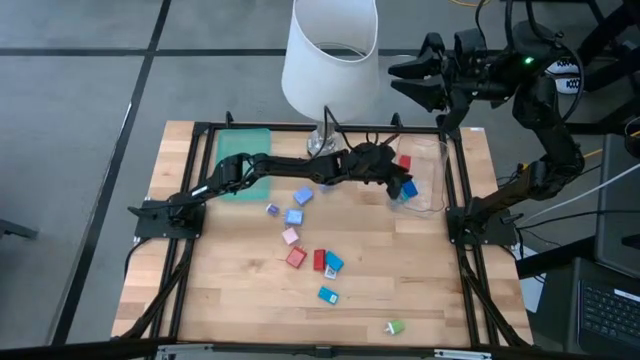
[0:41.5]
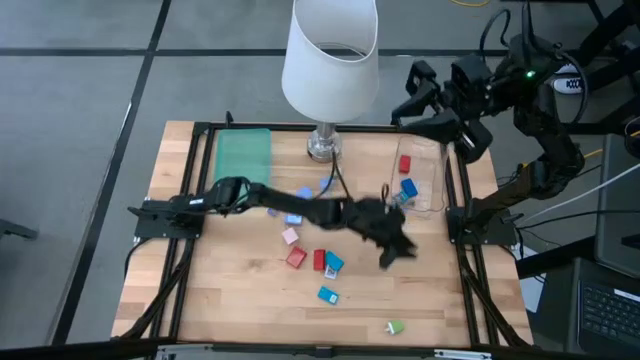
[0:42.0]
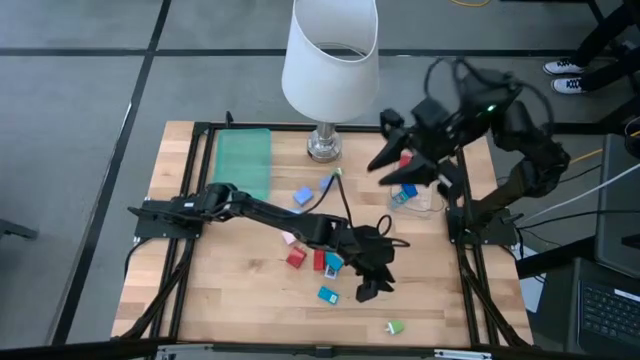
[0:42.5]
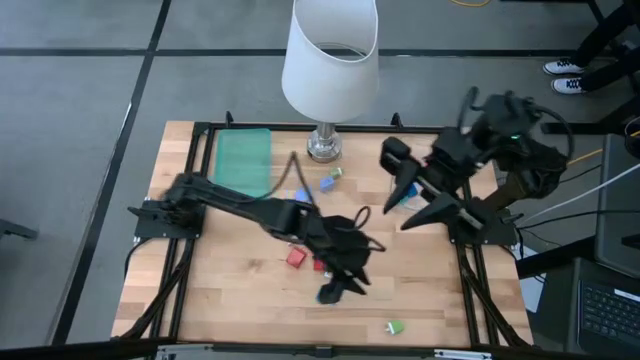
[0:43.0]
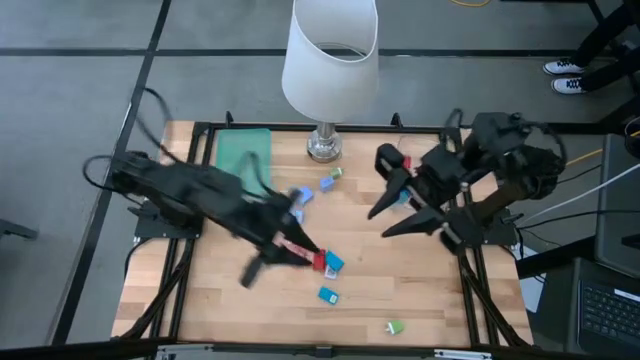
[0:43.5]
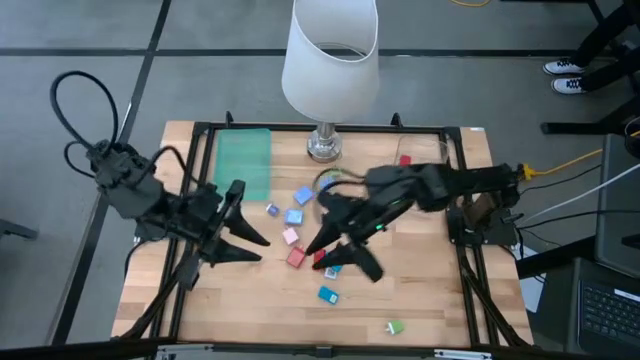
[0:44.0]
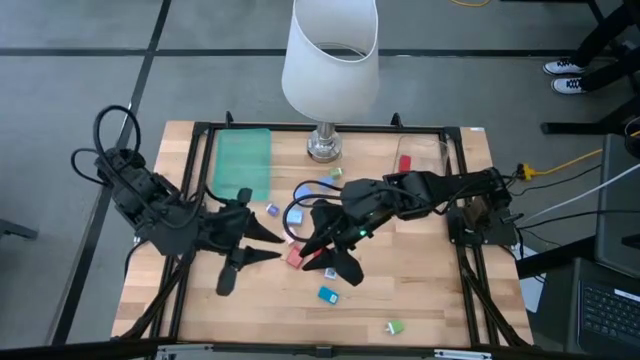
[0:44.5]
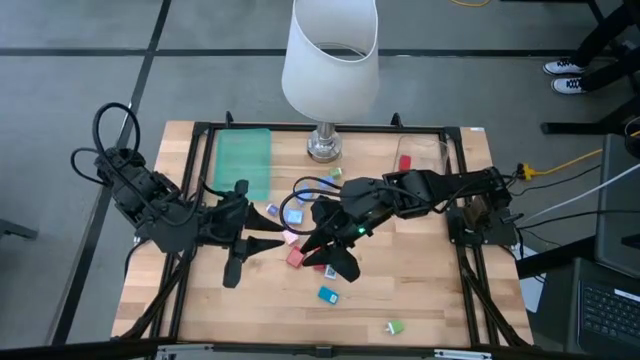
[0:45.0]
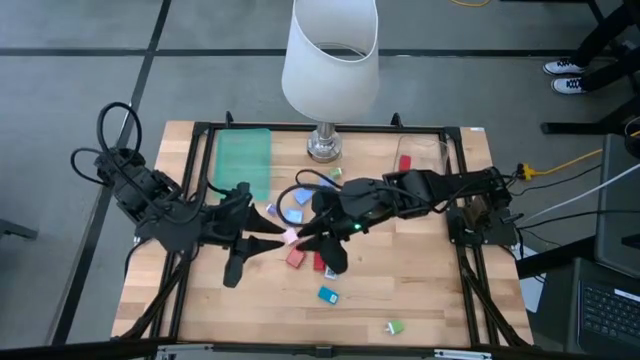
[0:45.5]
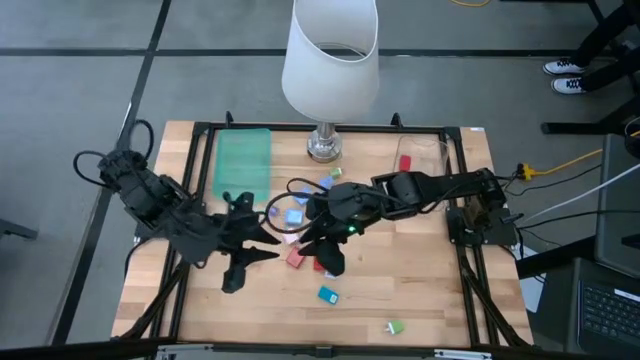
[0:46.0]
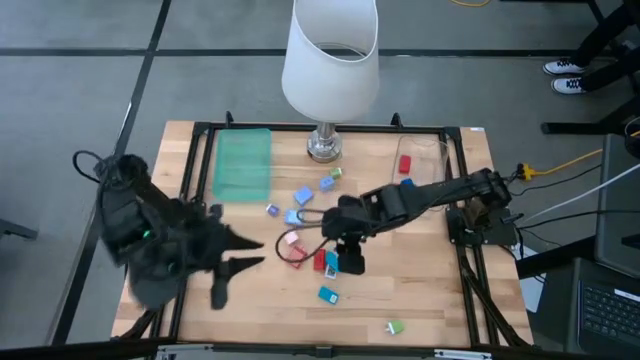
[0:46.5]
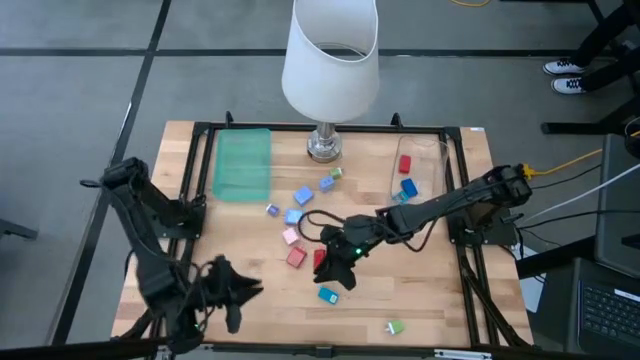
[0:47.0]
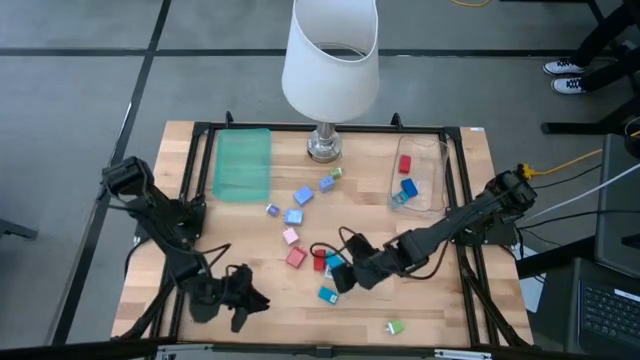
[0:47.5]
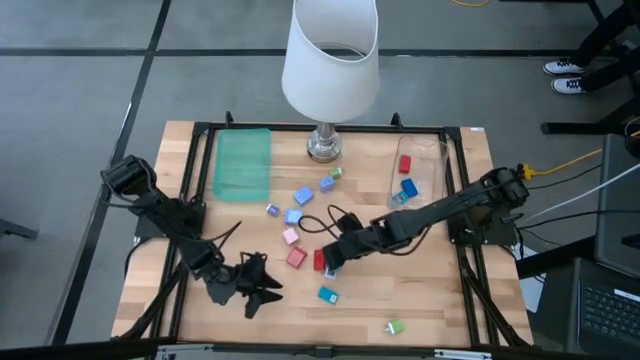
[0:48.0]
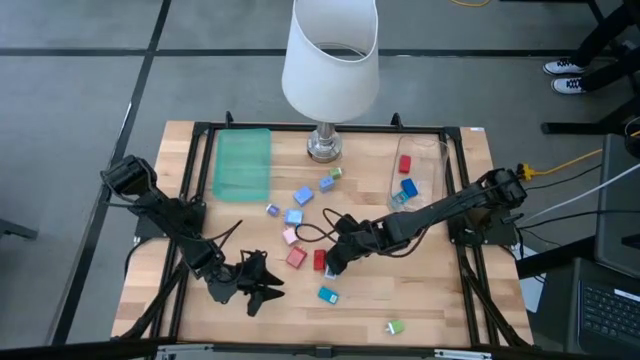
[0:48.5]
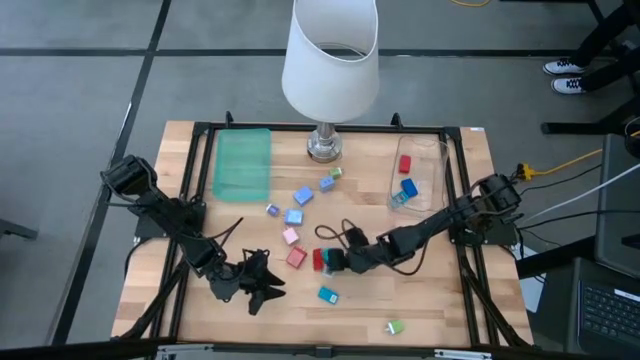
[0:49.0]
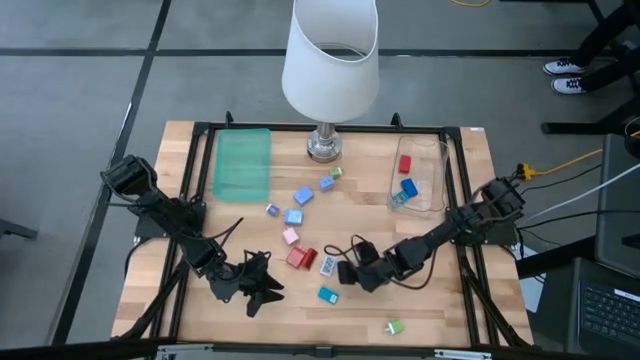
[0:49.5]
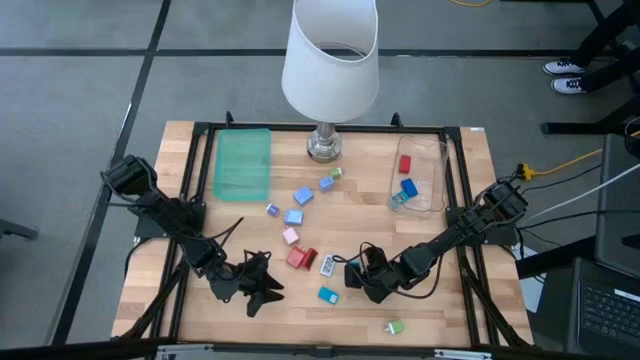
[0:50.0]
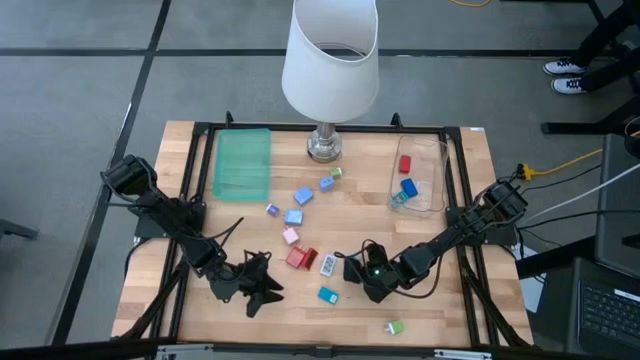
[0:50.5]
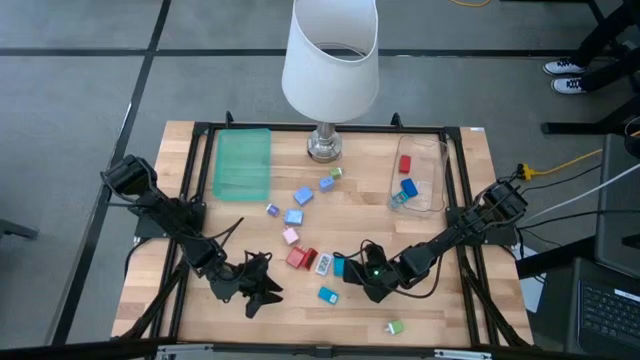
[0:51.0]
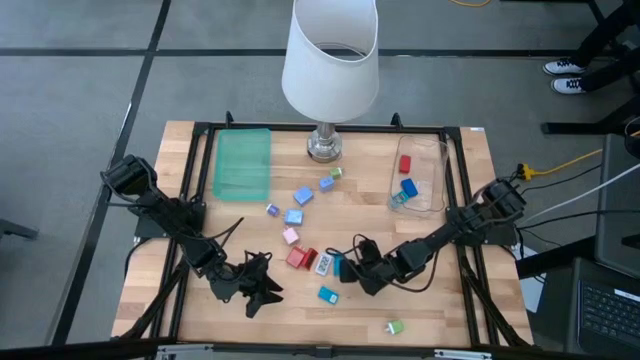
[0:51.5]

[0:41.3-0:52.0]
Task: Pick & Place Office items
Put the light blue timer cover into the transparent bin

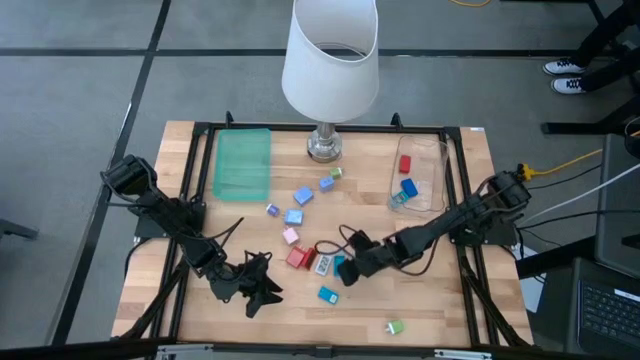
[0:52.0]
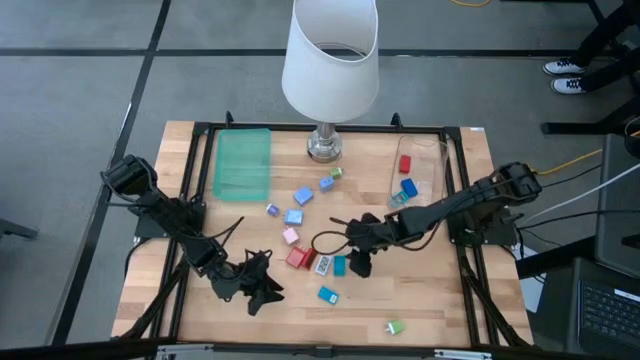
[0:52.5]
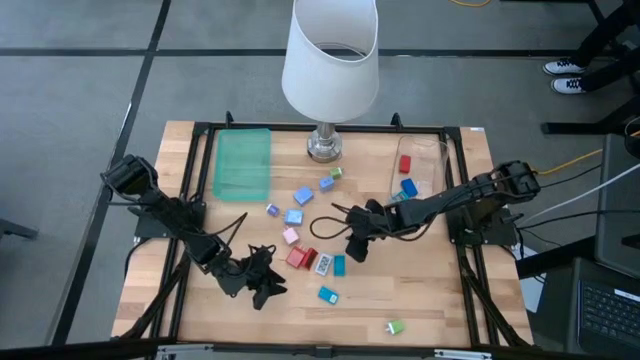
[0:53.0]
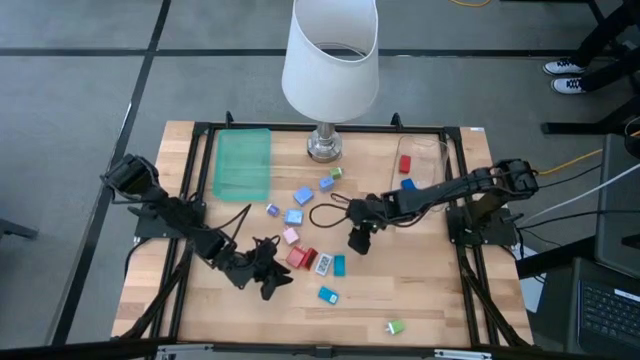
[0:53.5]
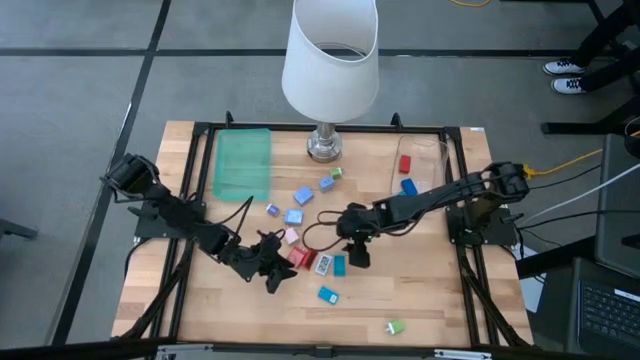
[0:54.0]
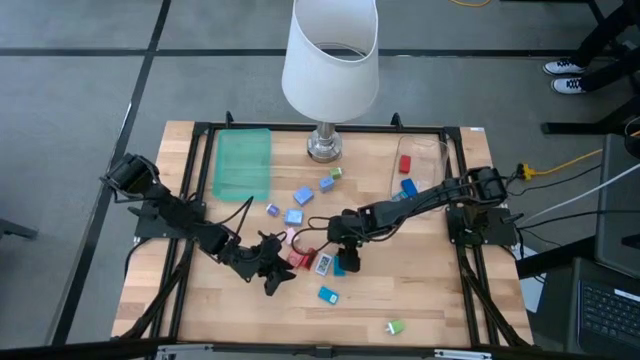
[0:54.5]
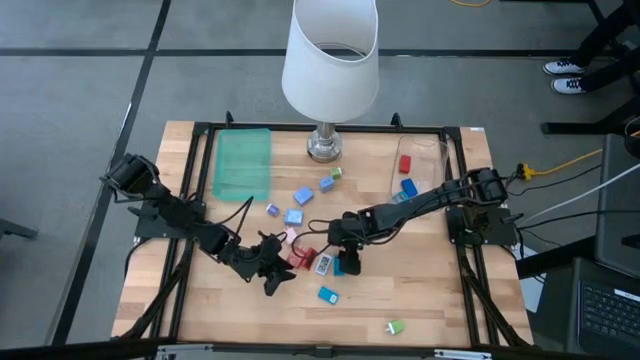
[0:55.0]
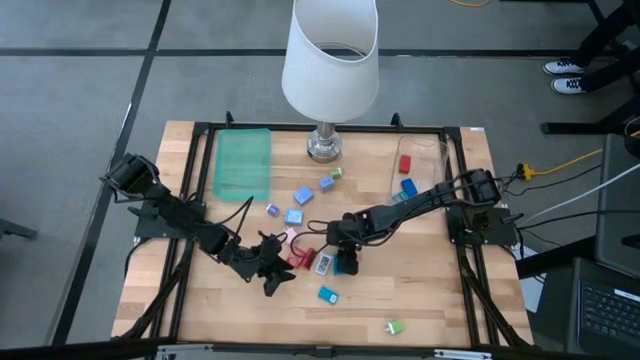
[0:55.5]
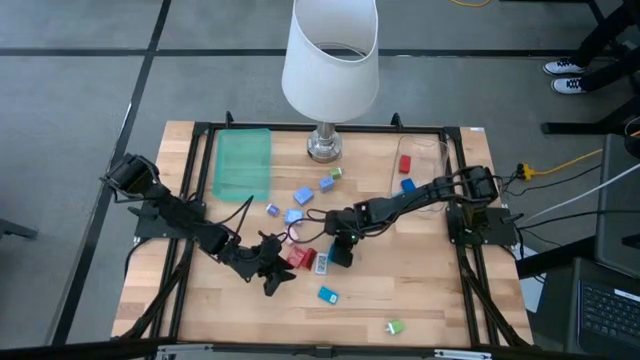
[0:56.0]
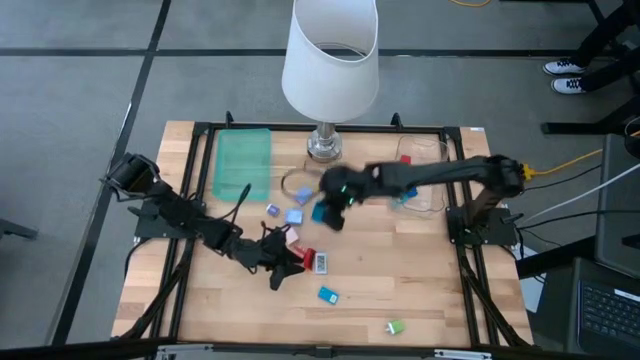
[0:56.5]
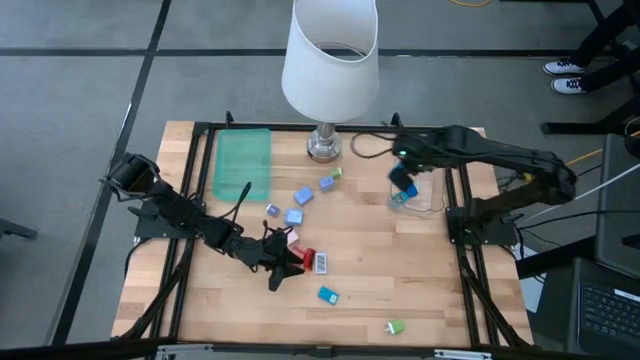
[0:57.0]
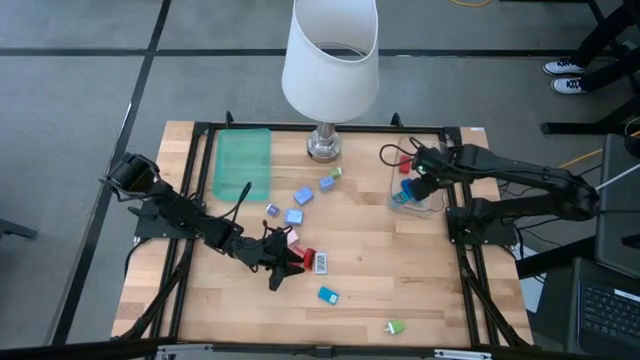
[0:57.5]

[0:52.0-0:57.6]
Put the light blue timer cover into the transparent bin

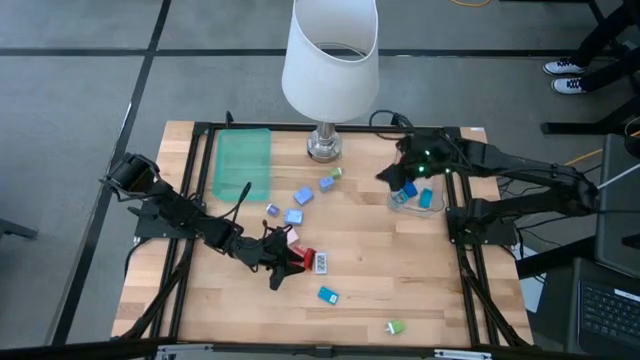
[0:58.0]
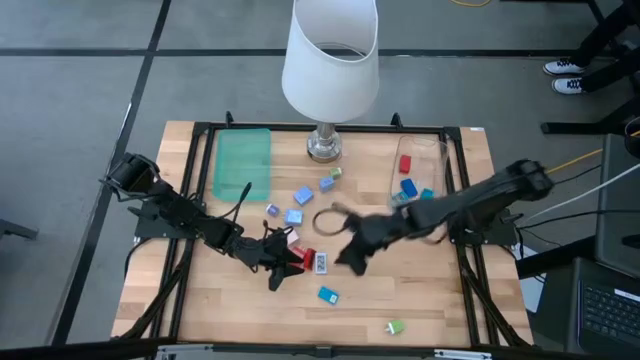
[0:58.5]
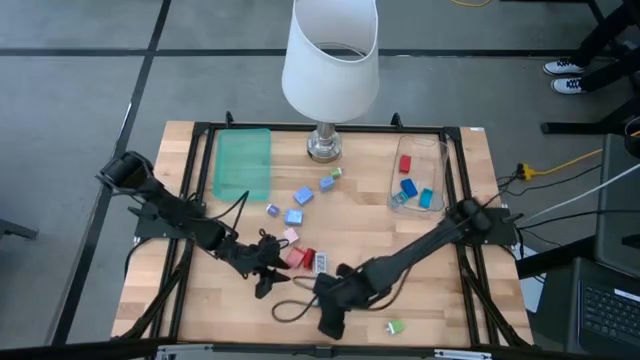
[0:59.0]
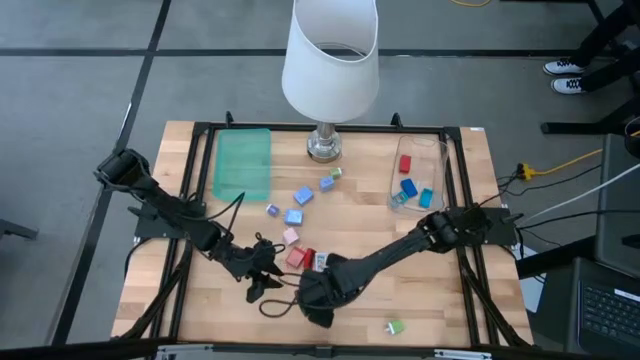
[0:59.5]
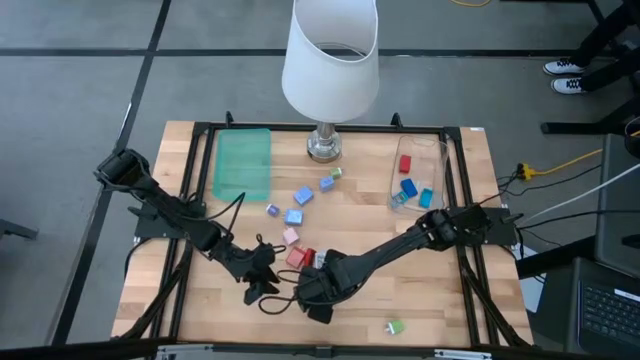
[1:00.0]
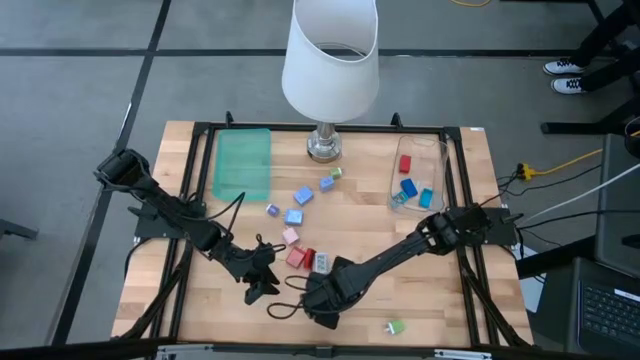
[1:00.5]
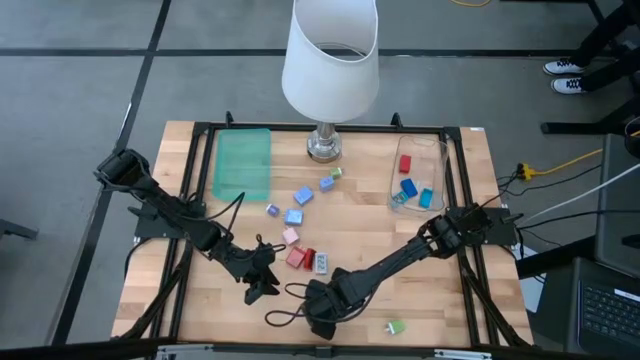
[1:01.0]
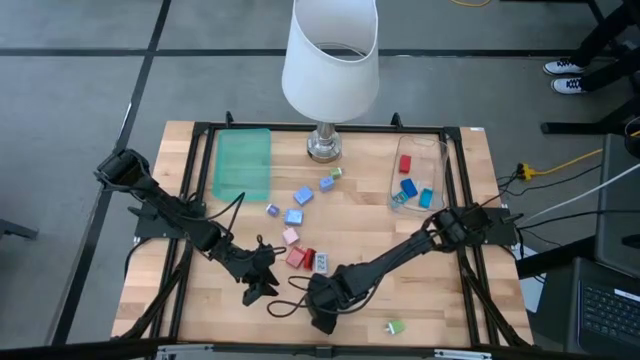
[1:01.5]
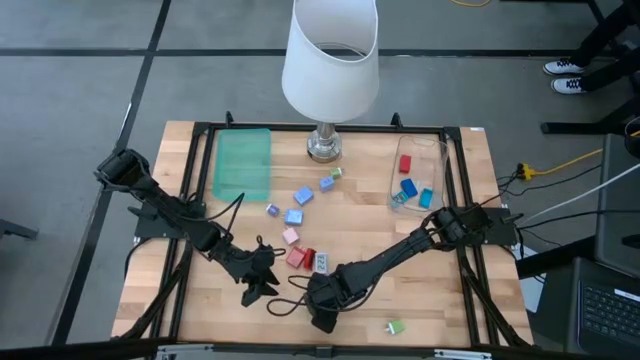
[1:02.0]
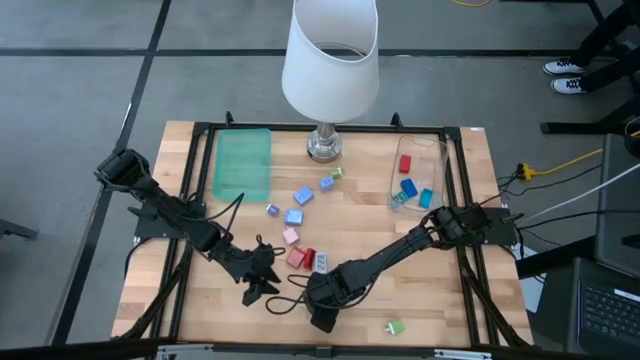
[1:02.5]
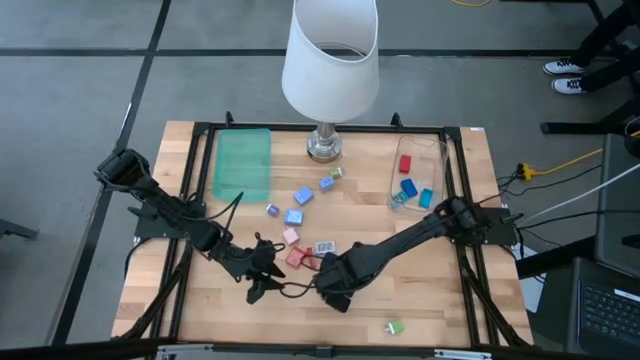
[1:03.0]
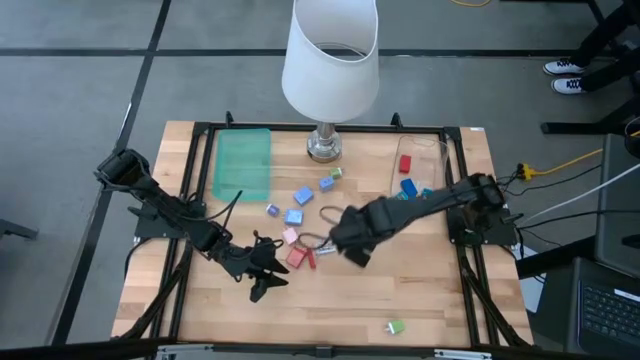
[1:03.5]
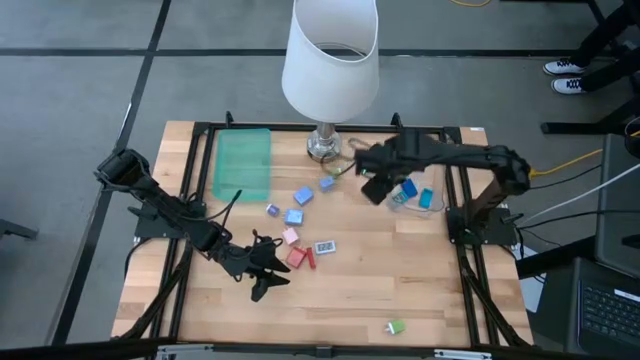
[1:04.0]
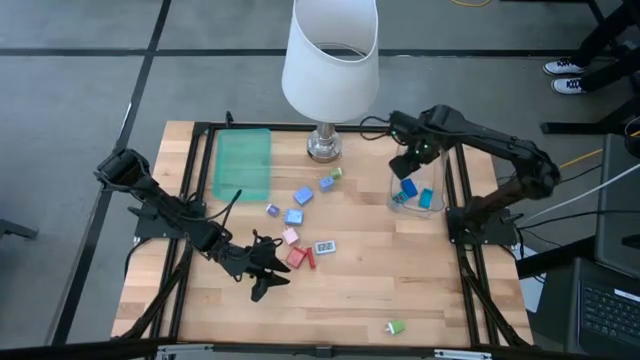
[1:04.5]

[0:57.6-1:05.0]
Put the light blue digital timer into the transparent bin
